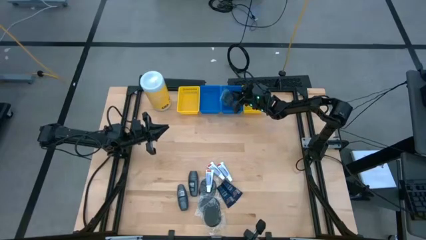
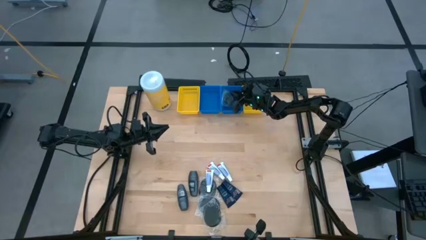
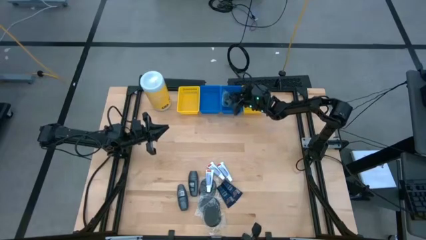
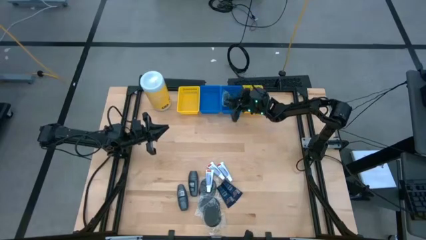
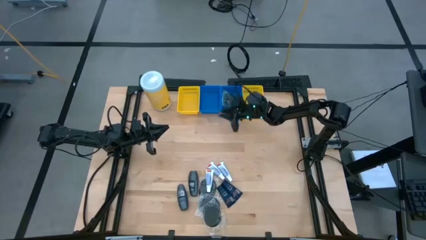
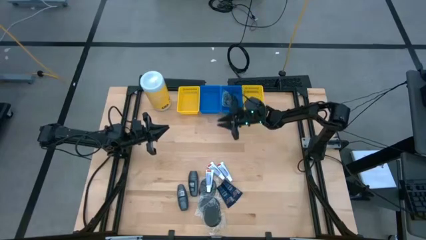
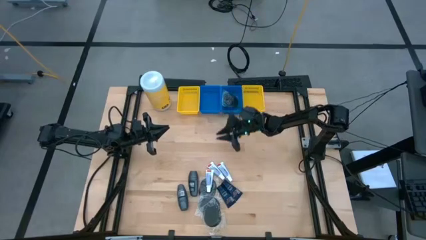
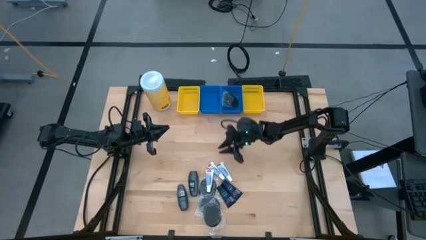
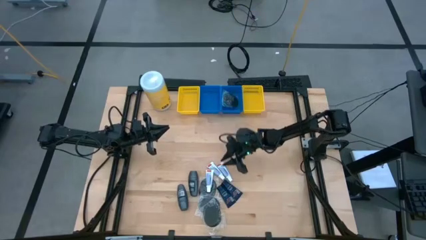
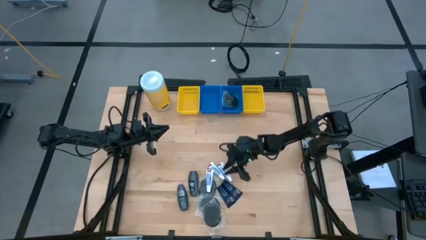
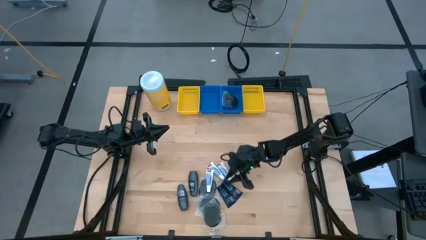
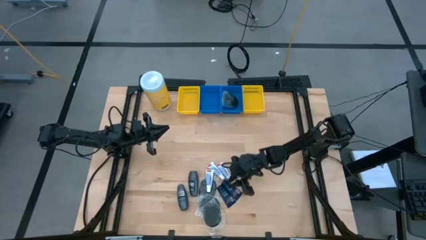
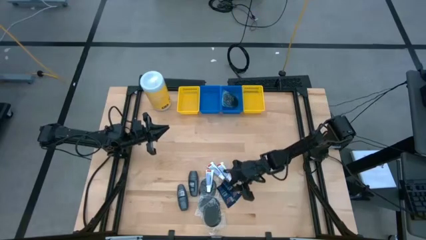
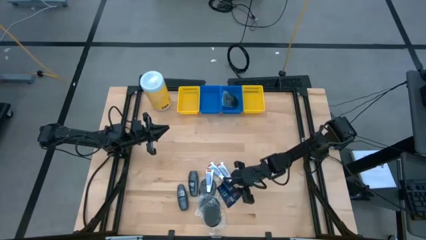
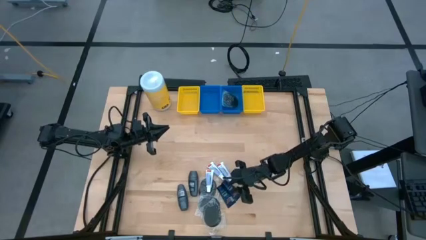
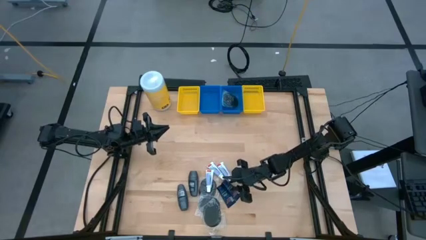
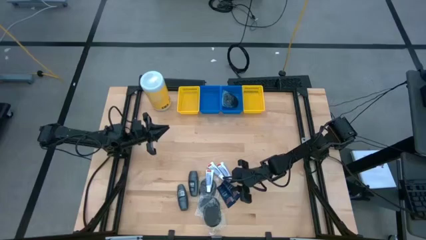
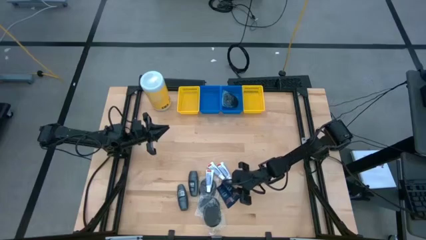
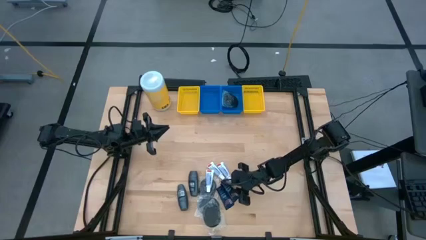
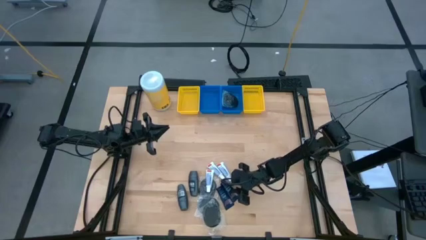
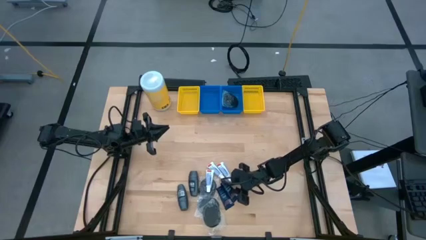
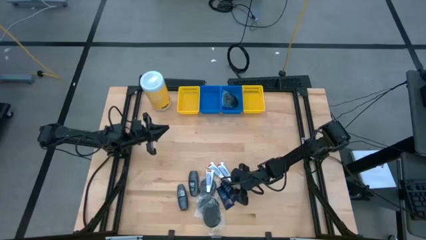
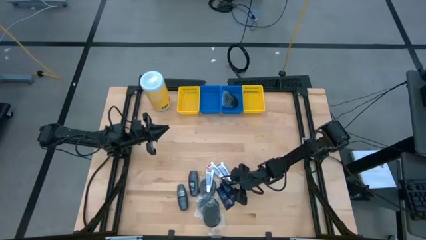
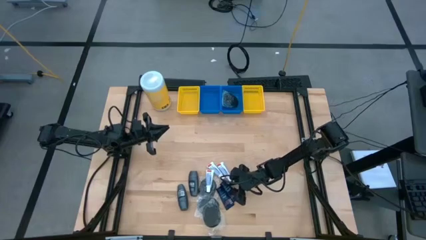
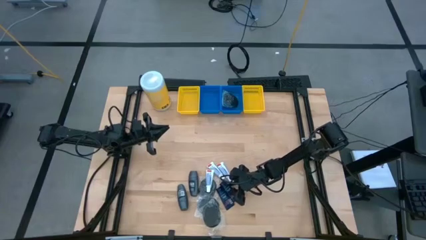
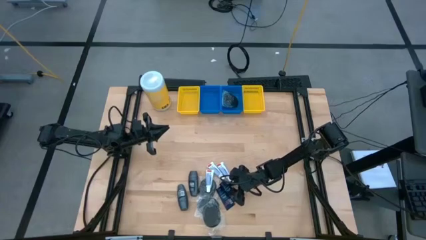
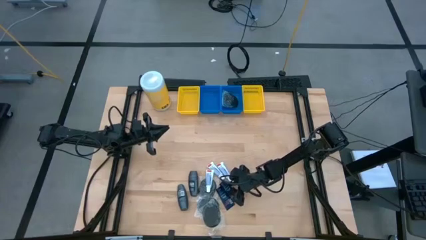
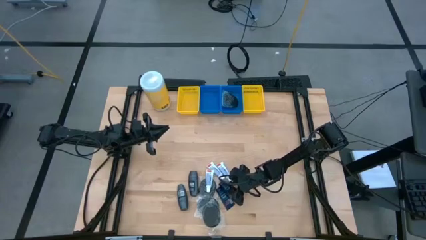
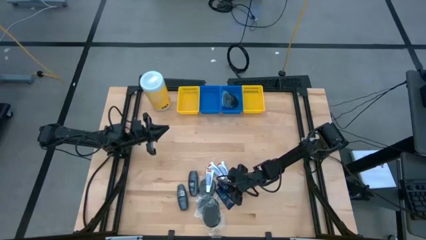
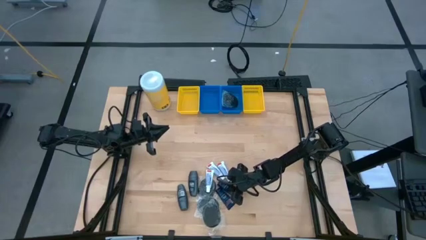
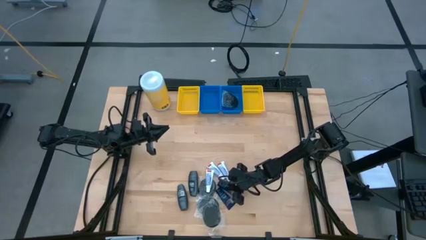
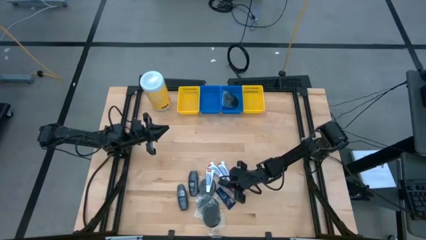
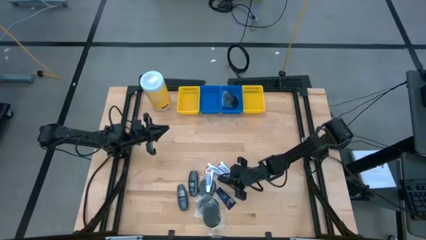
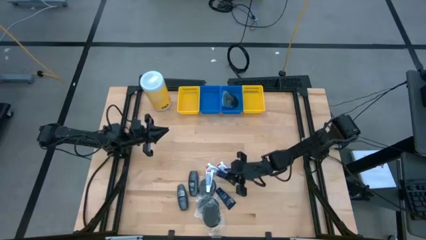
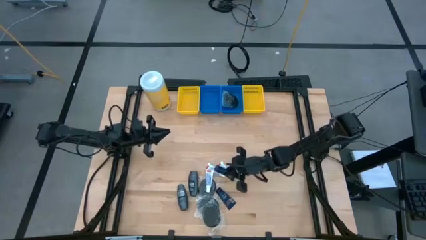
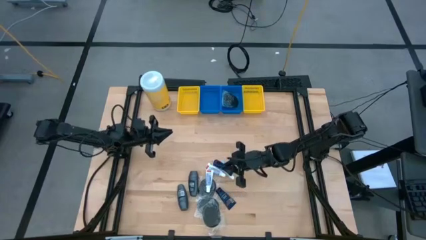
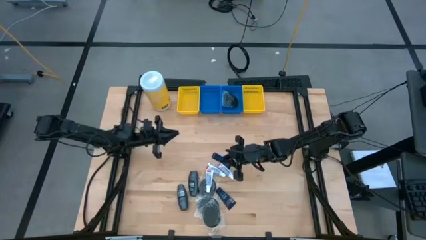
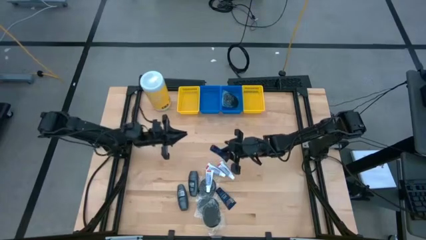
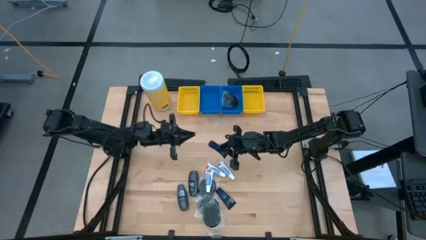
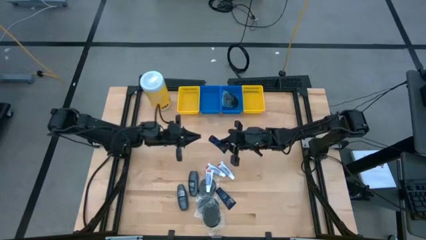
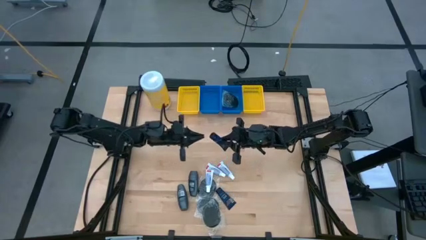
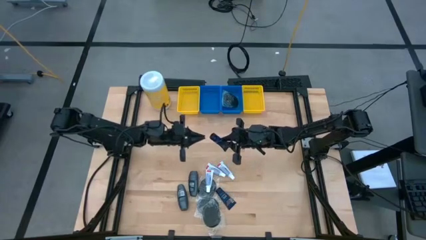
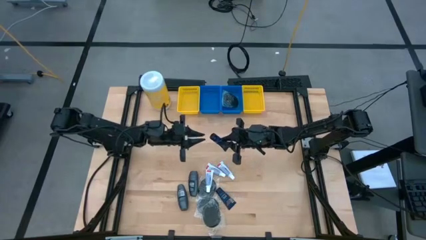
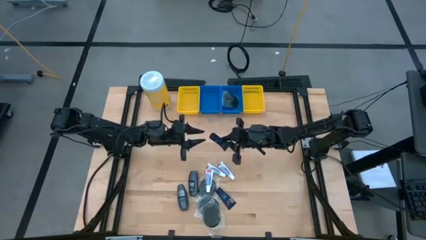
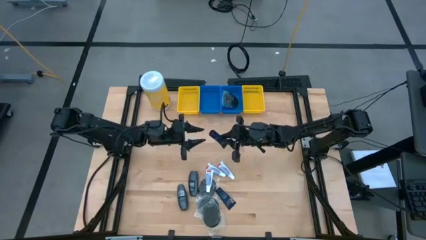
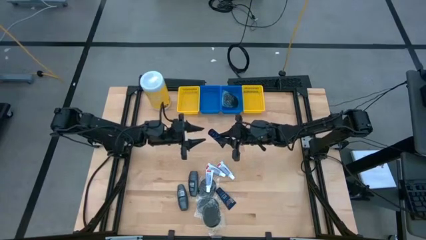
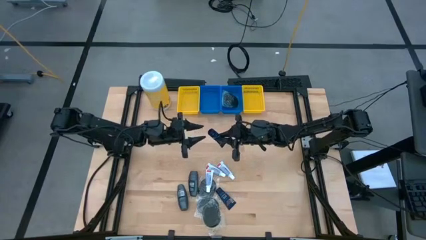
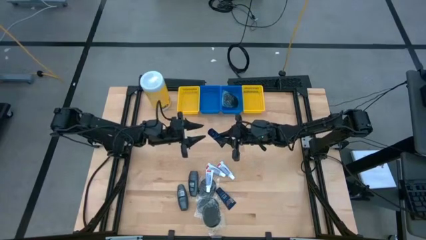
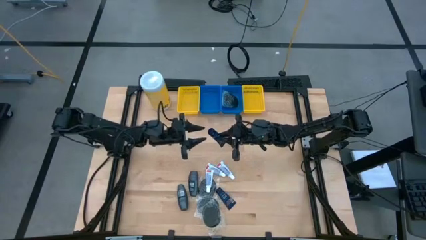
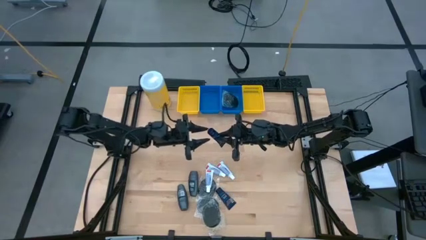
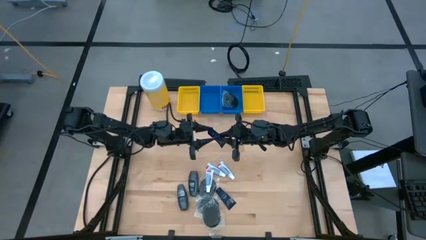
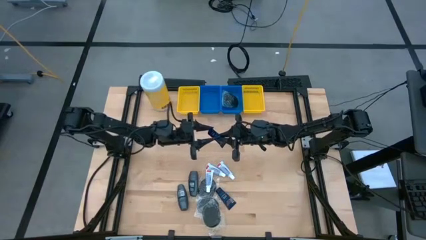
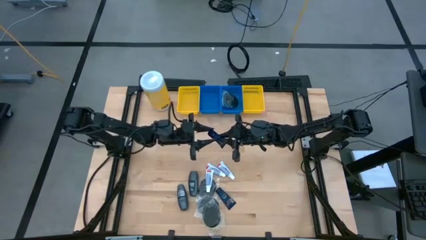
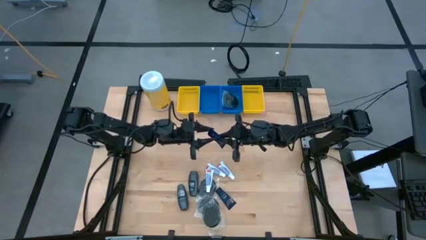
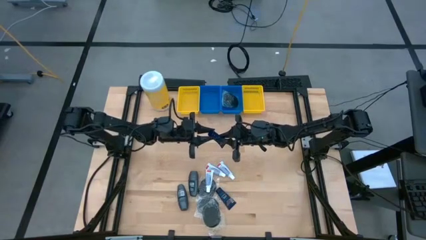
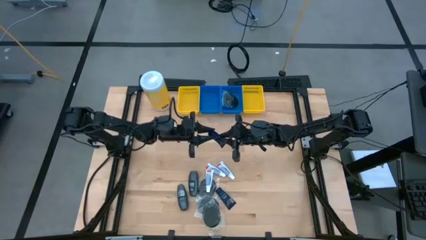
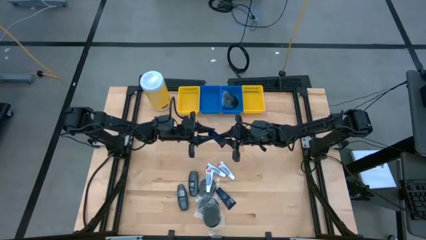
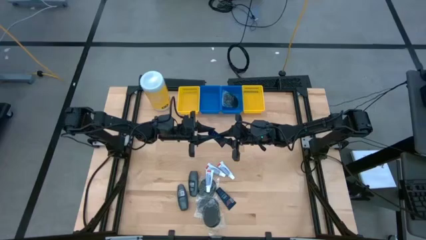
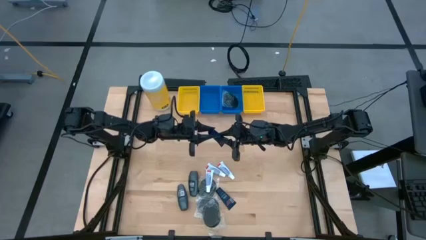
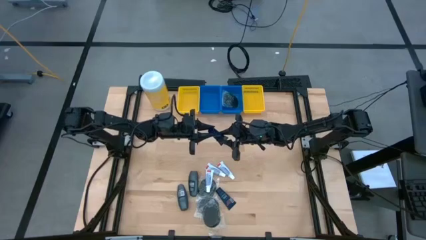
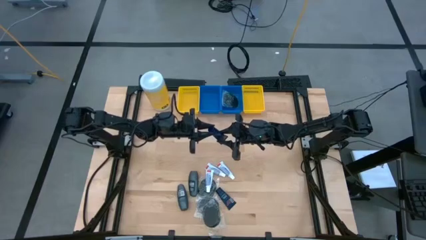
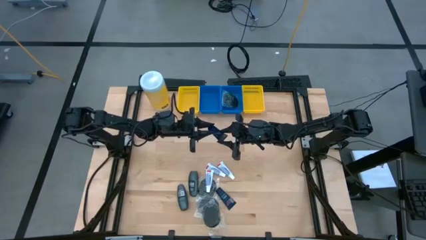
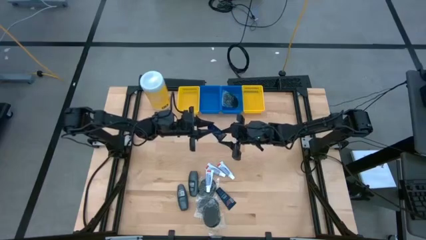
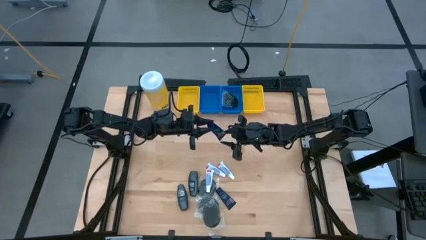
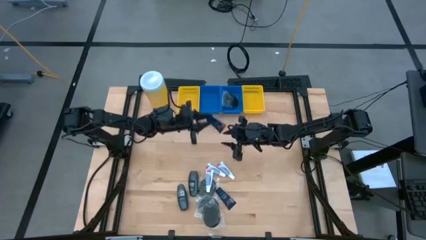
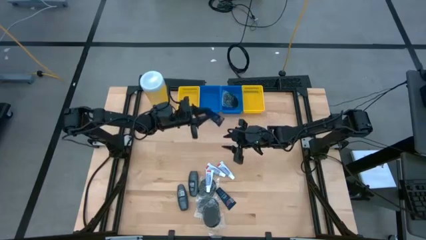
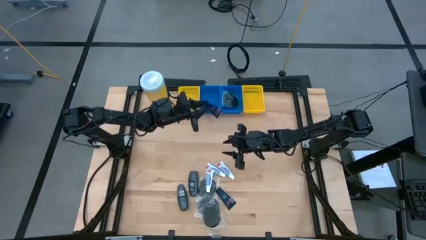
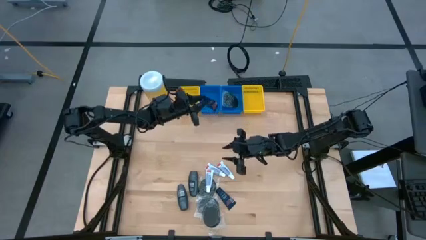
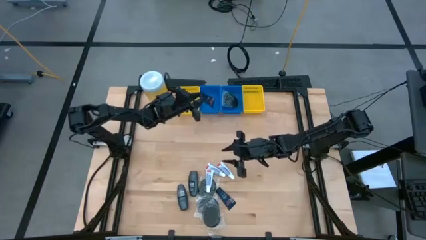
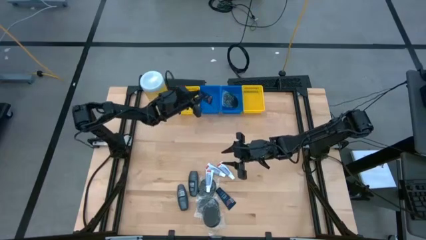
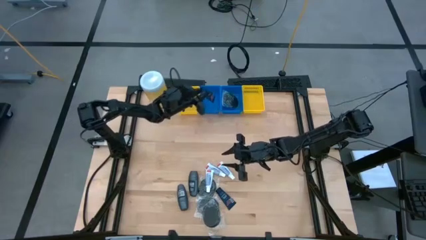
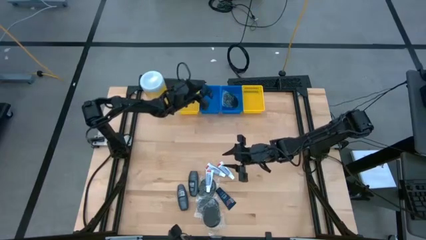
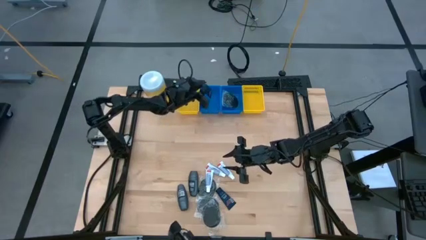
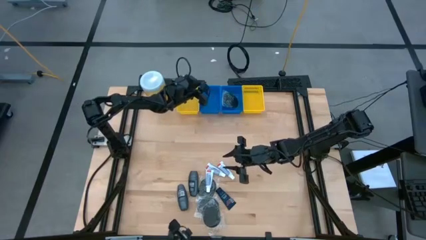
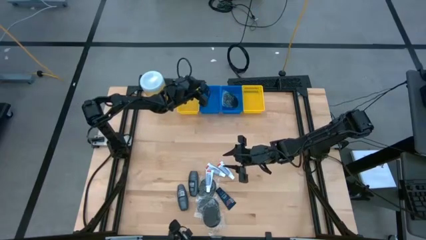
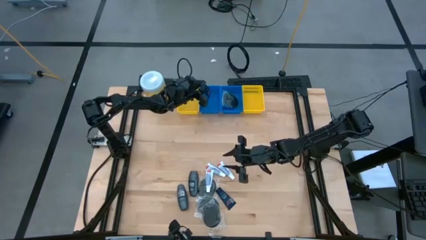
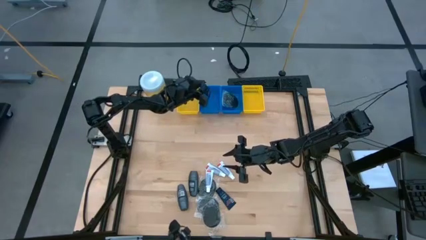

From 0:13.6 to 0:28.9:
Task: Pick & Place Travel size toiletries
Put the shave cream into the left blue bin

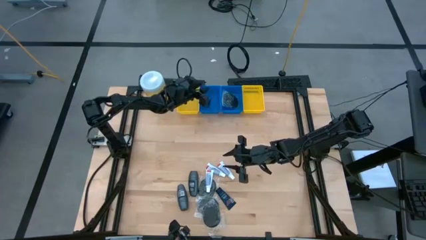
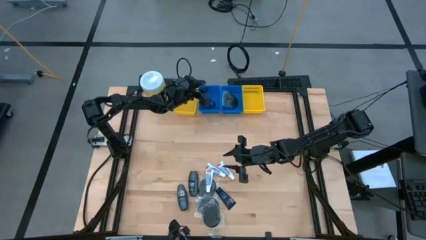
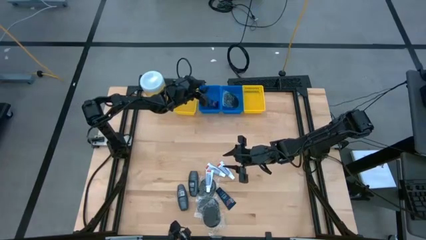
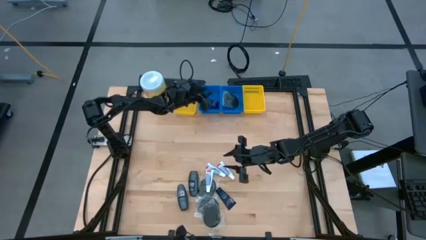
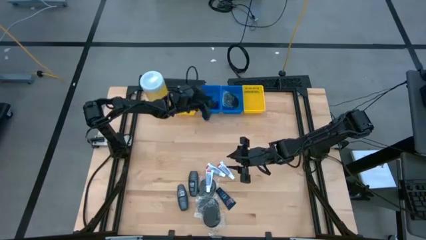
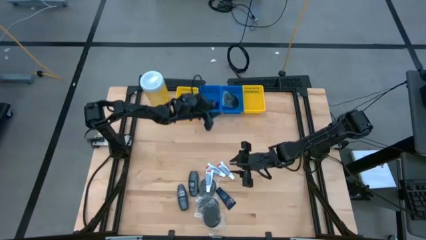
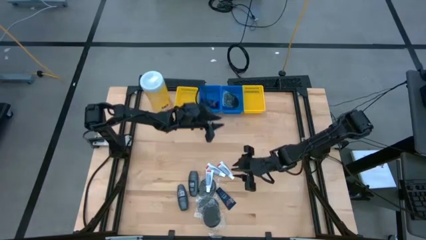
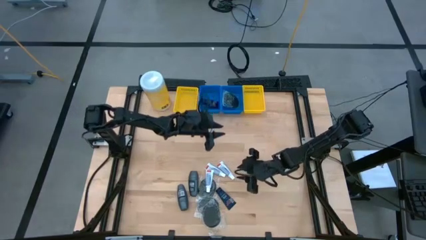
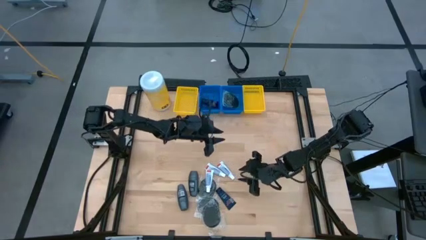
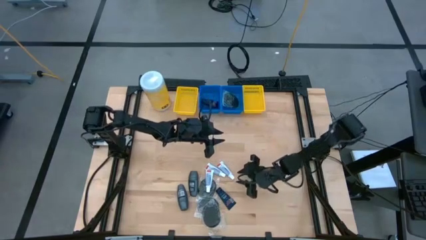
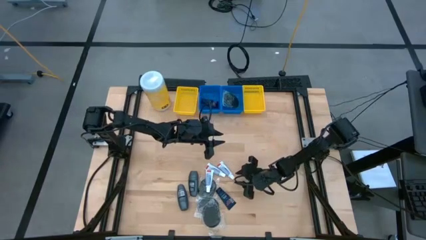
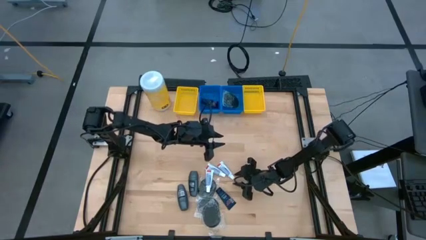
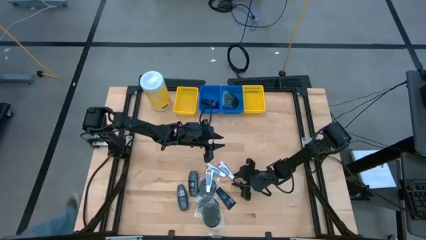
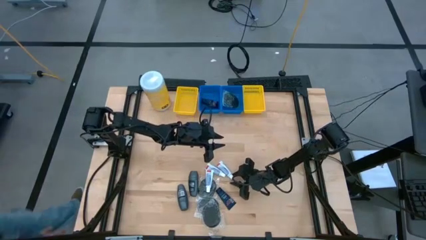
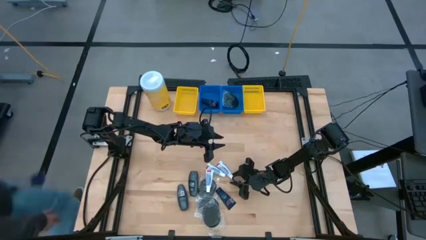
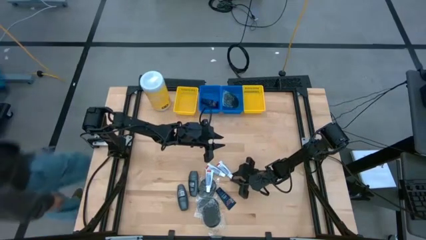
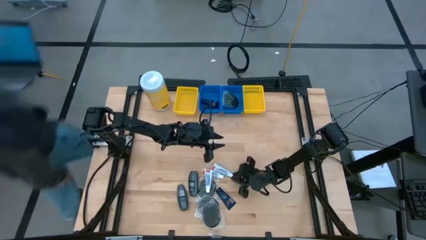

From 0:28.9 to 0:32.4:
Put the toothpaste into the left yellow bin
